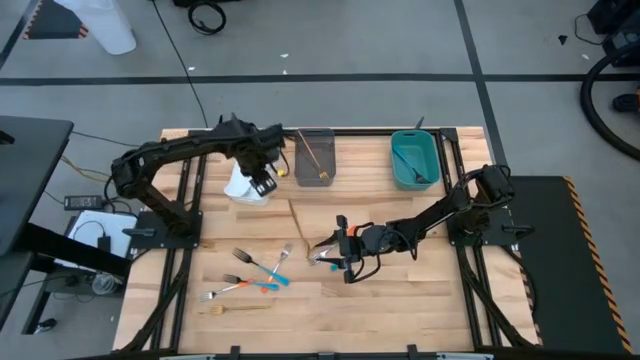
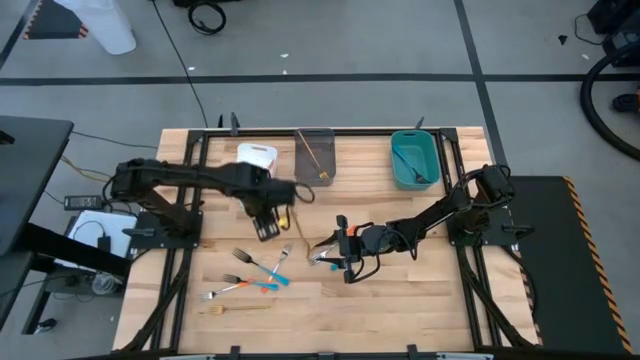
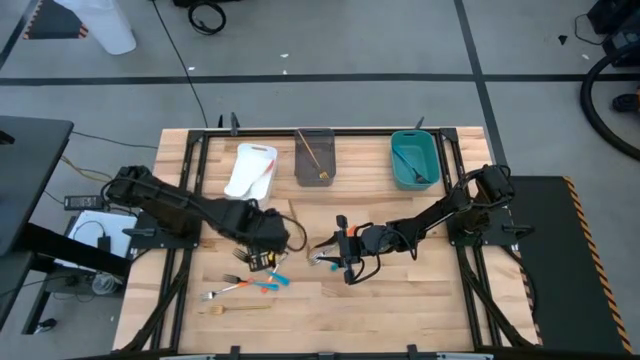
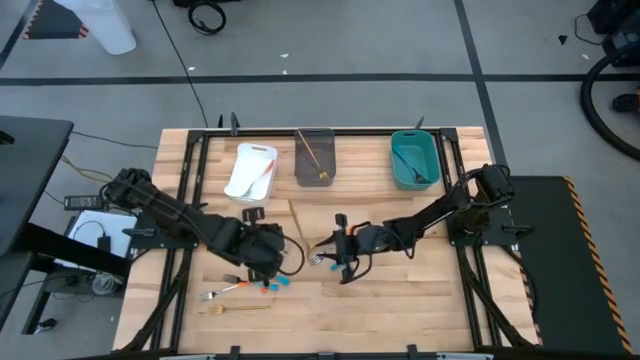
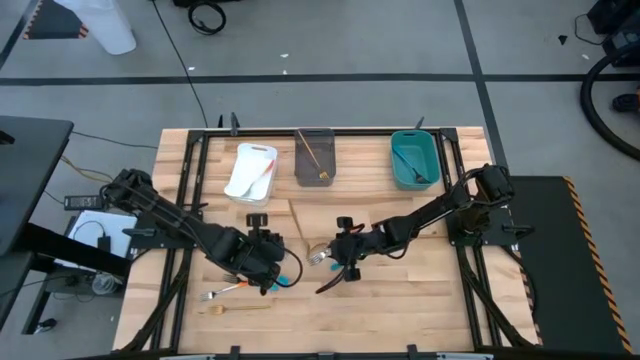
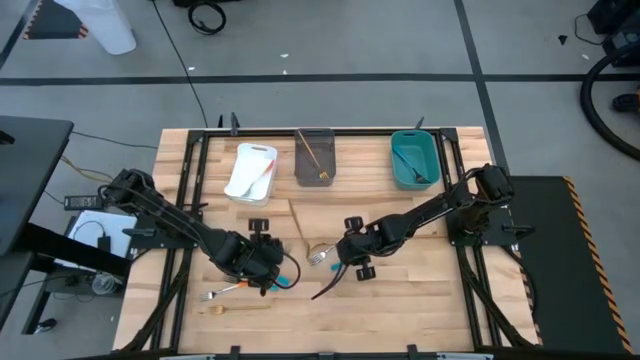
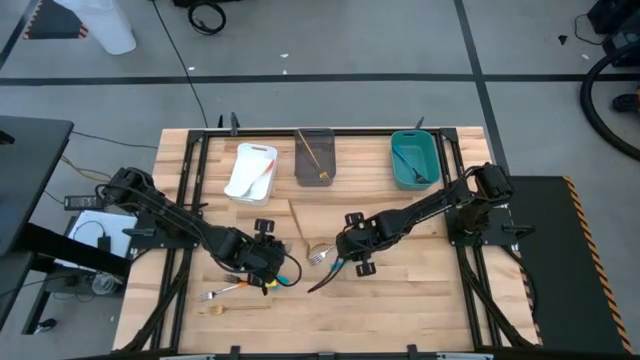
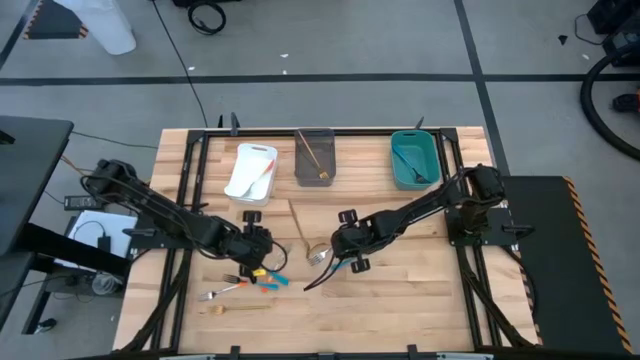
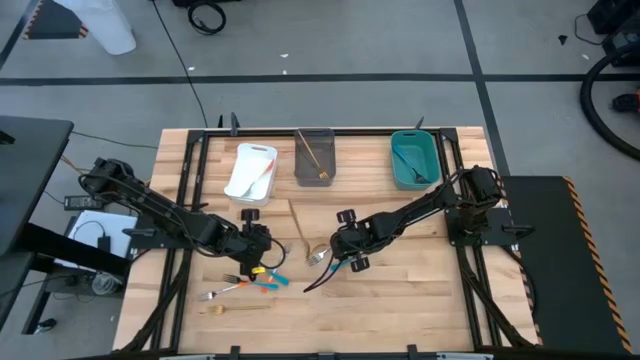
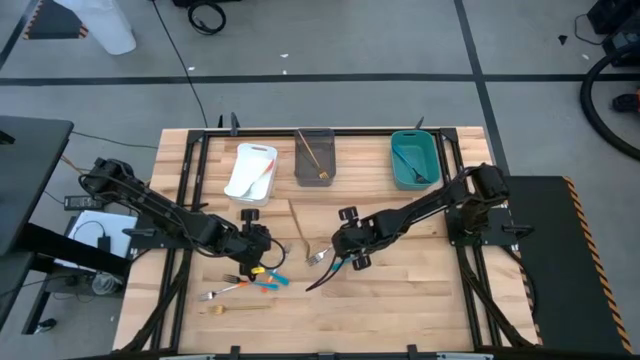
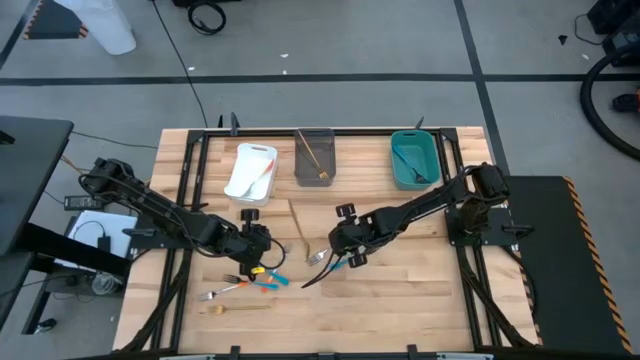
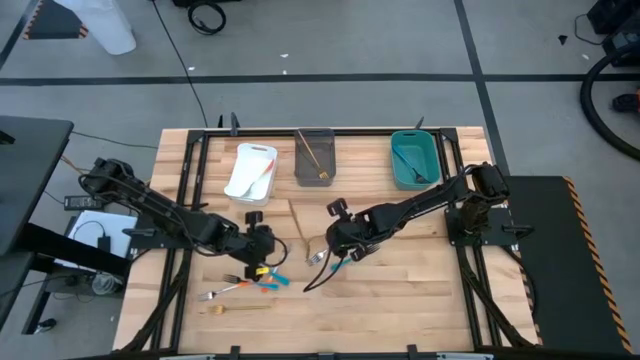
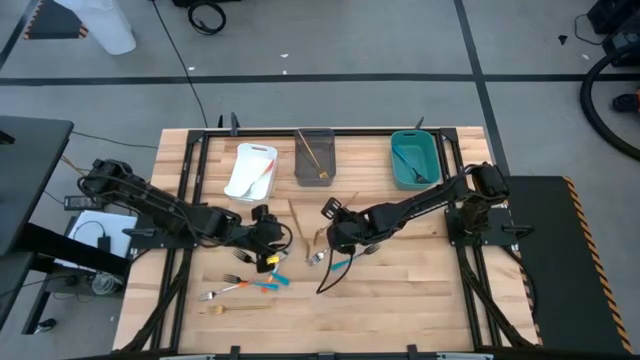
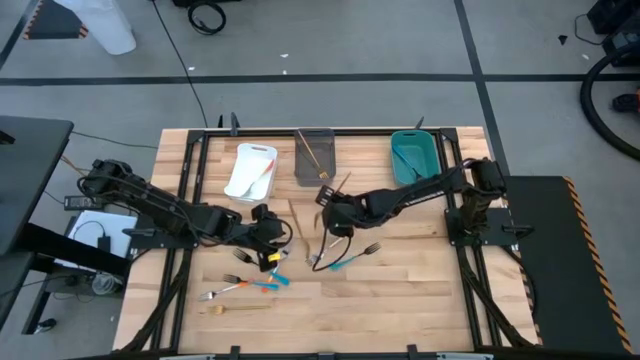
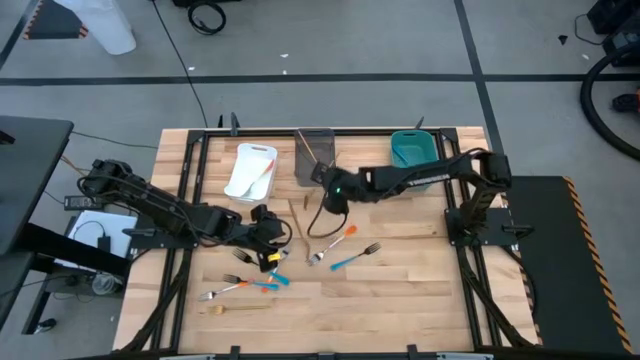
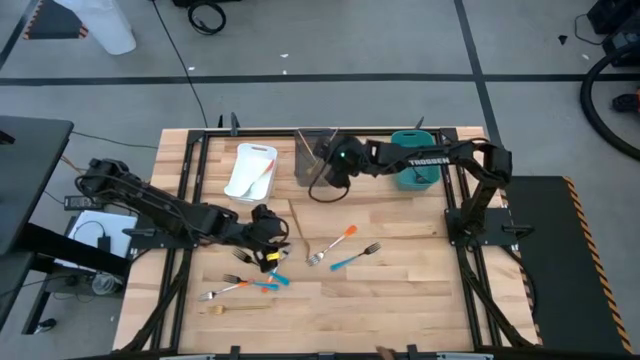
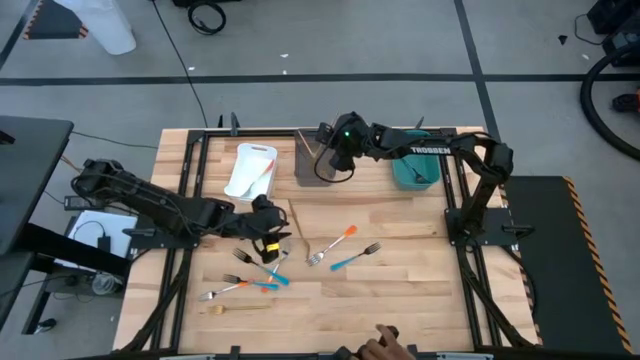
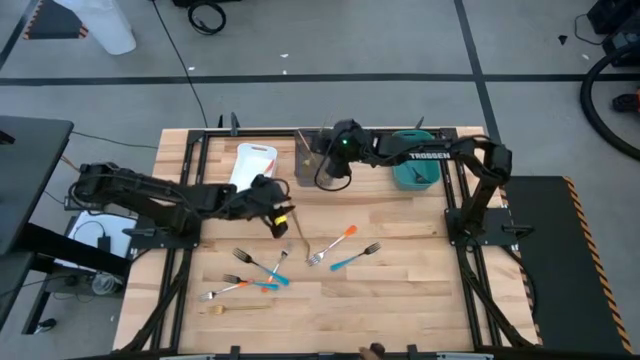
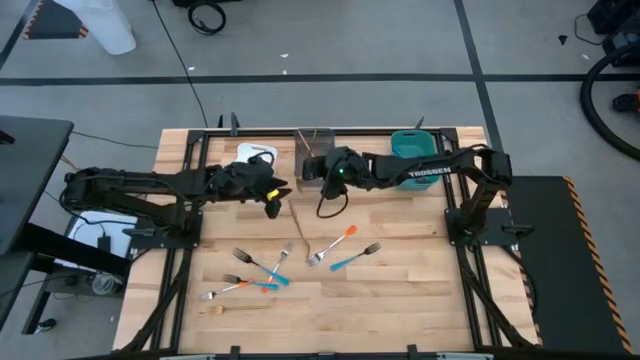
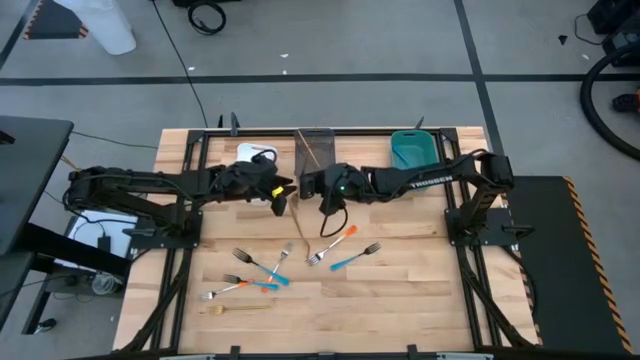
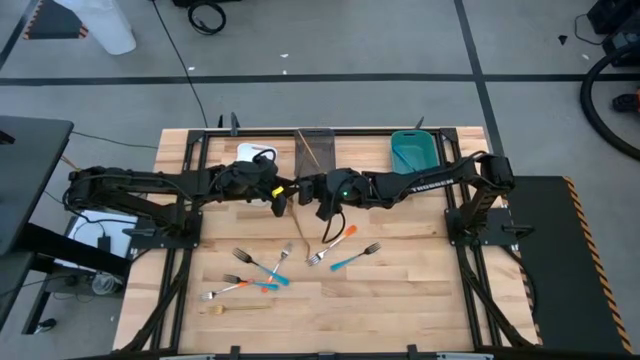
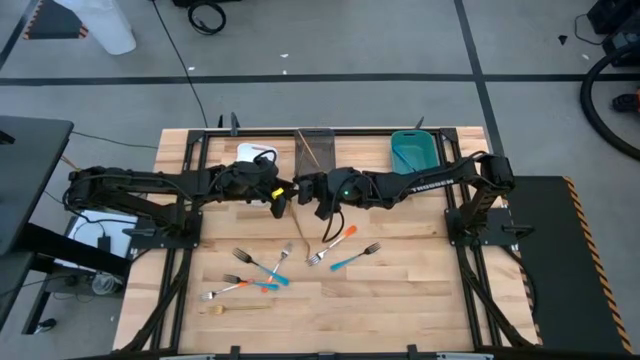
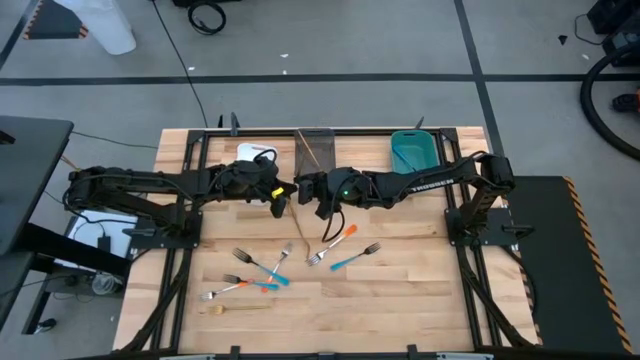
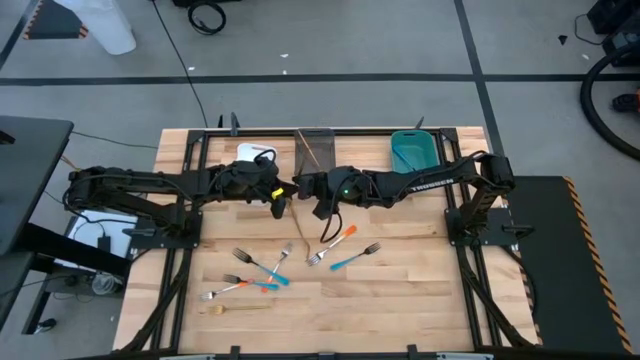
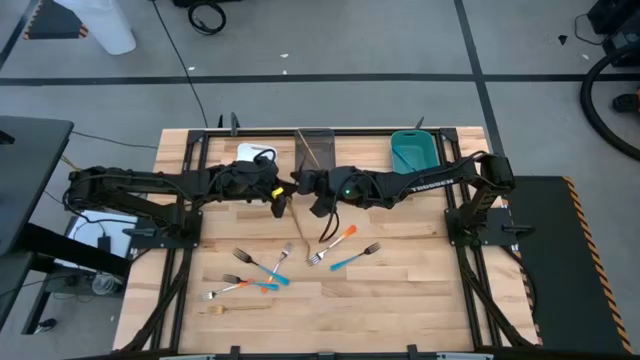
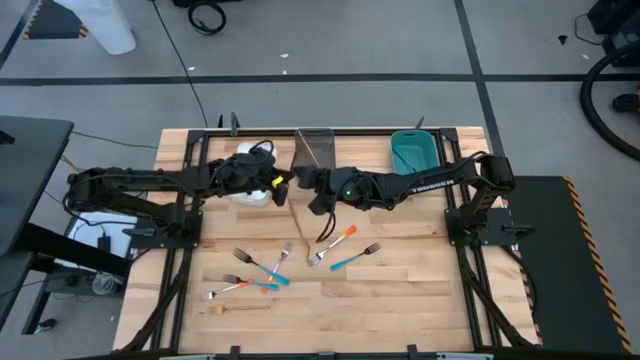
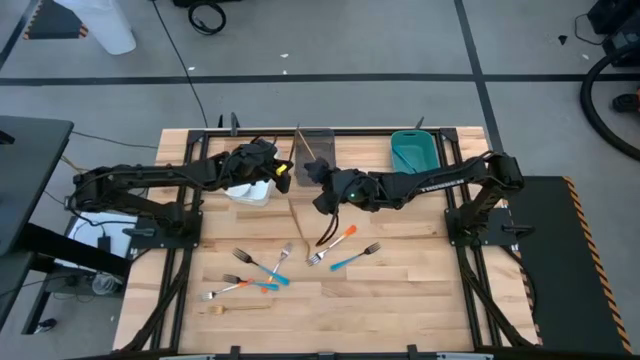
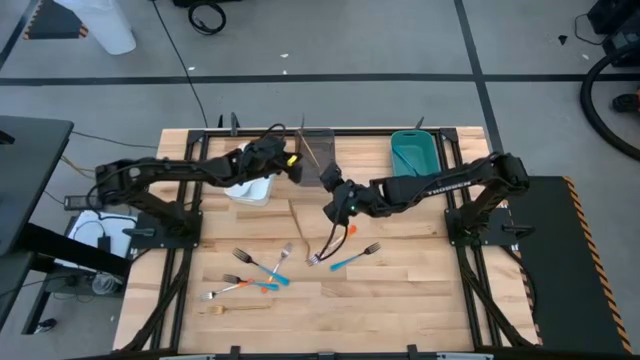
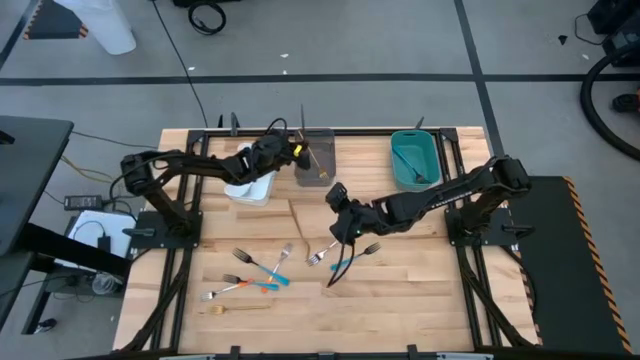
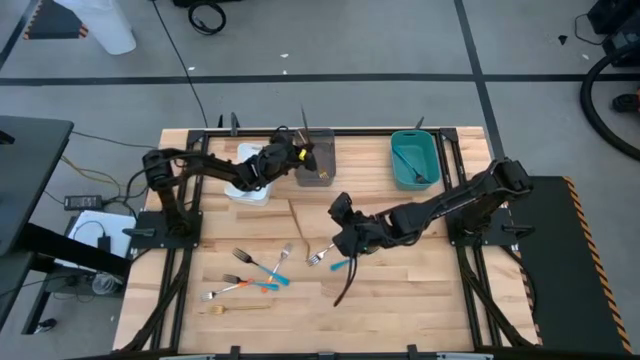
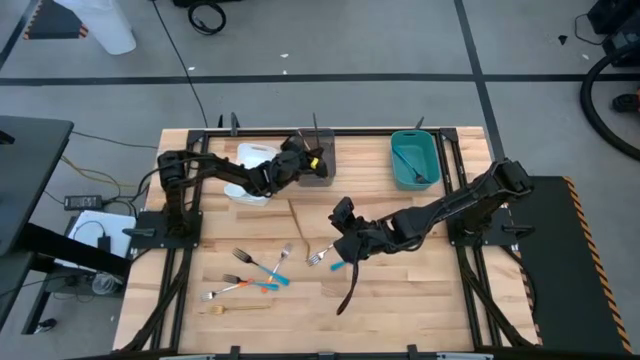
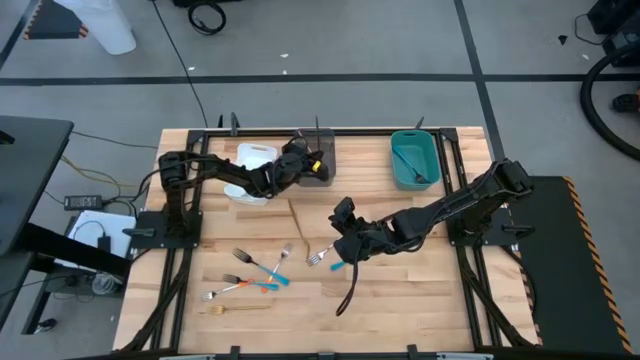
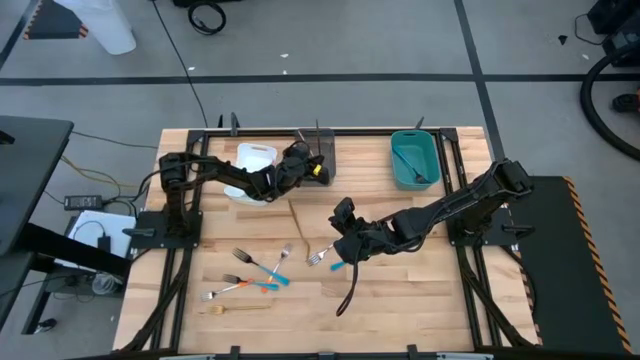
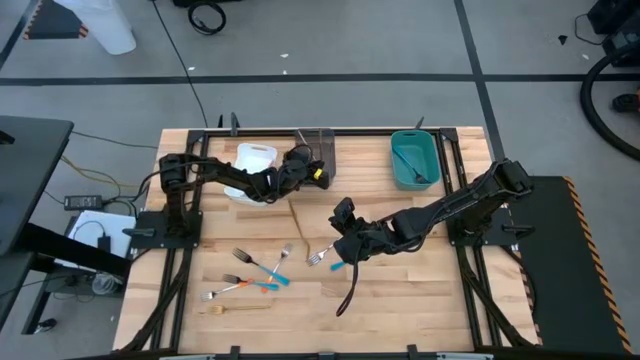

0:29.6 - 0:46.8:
Task: Sort silverware by color (type)
Put the yellow fork into the black bin
